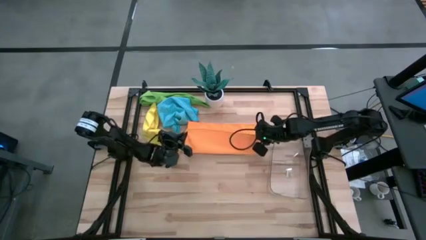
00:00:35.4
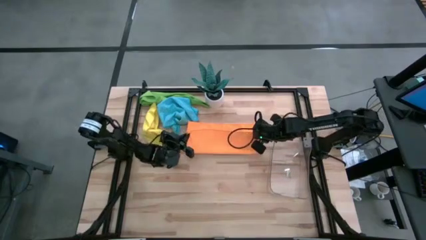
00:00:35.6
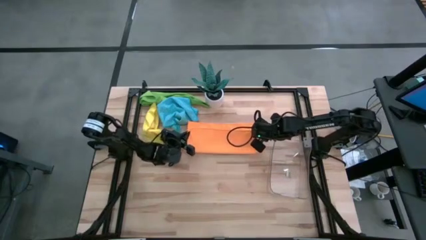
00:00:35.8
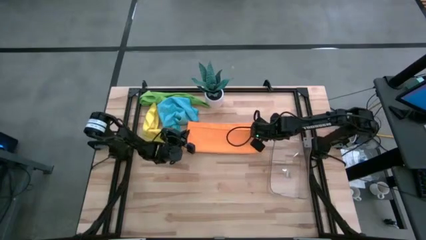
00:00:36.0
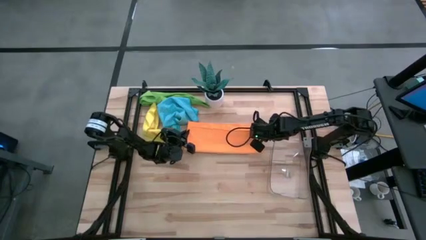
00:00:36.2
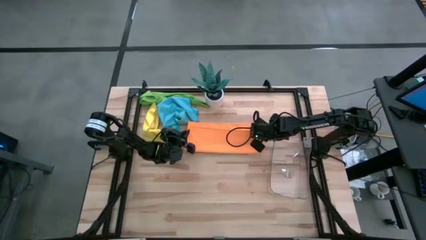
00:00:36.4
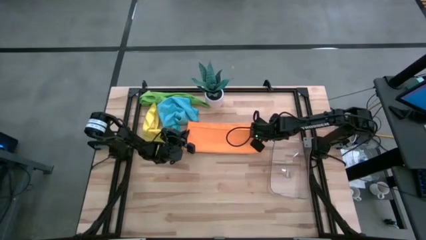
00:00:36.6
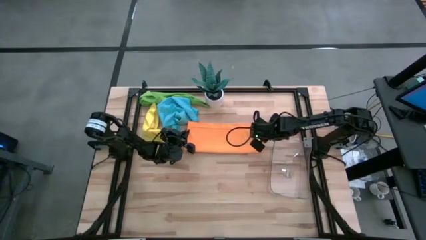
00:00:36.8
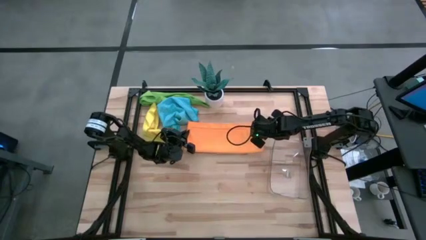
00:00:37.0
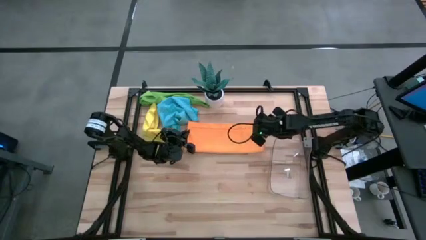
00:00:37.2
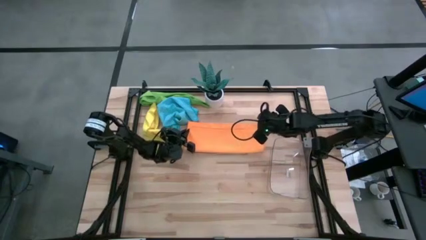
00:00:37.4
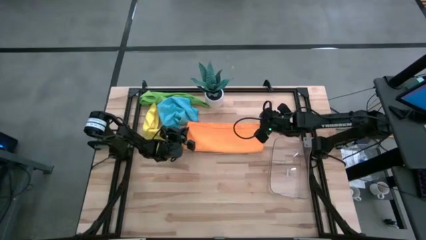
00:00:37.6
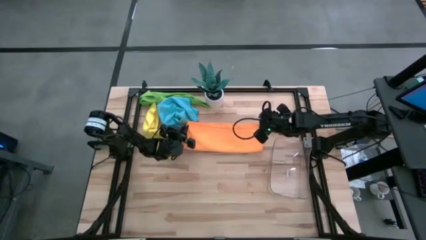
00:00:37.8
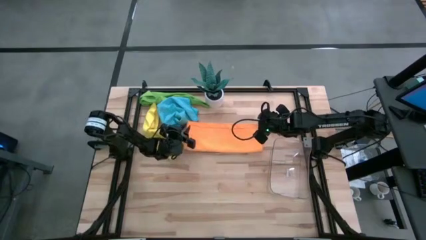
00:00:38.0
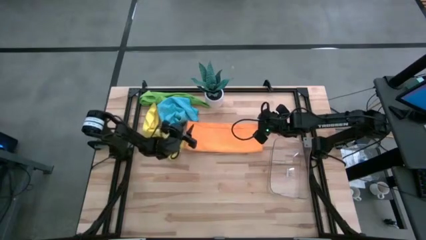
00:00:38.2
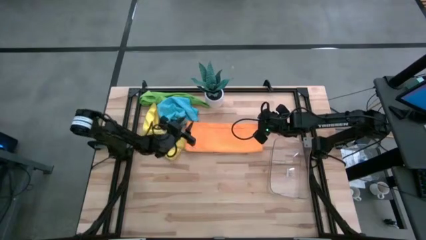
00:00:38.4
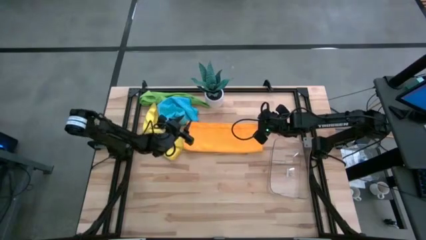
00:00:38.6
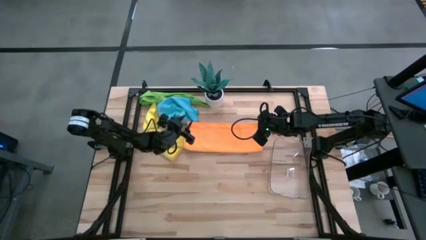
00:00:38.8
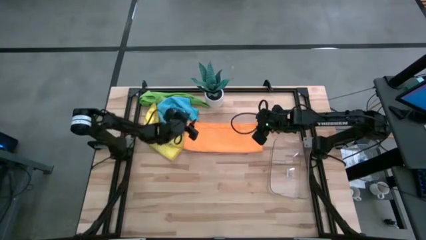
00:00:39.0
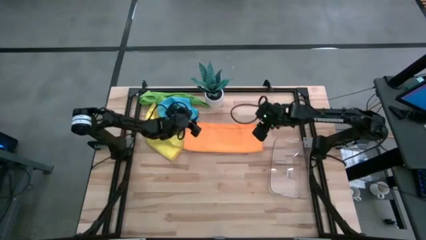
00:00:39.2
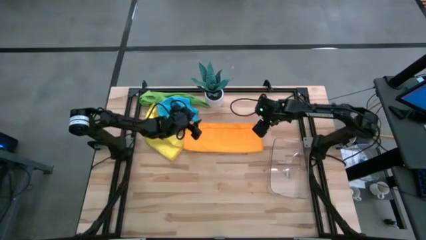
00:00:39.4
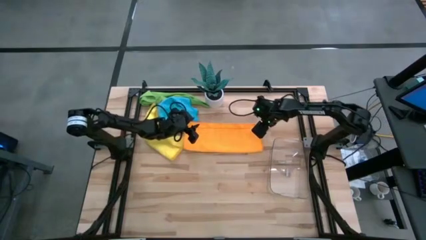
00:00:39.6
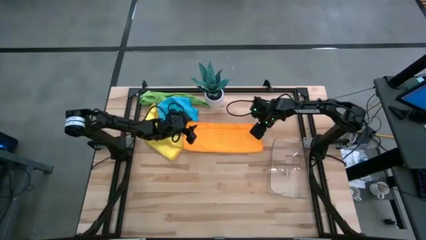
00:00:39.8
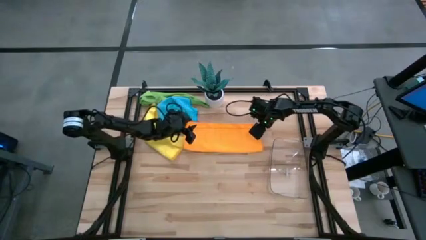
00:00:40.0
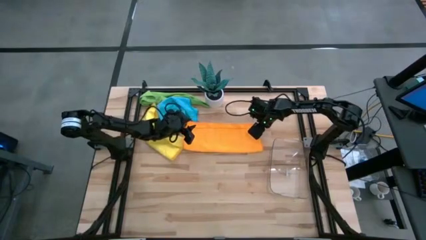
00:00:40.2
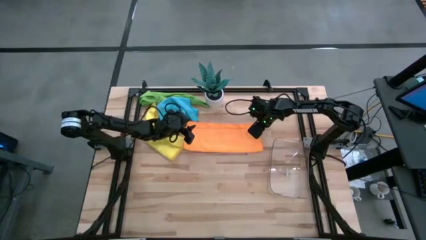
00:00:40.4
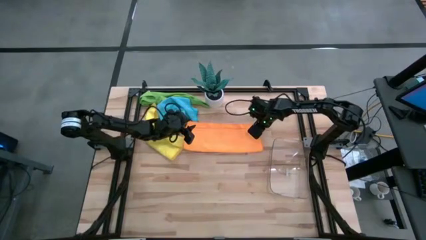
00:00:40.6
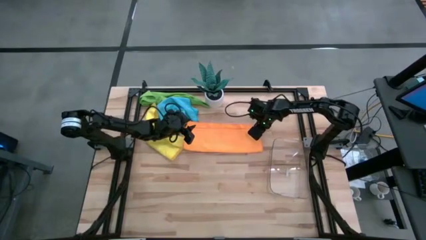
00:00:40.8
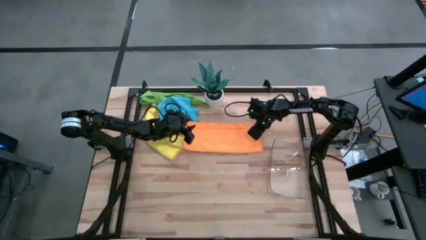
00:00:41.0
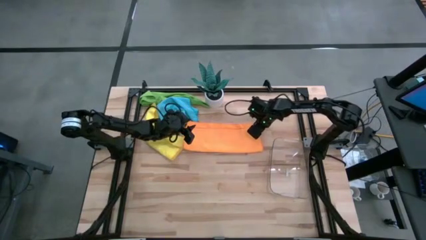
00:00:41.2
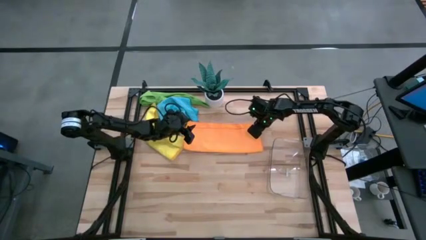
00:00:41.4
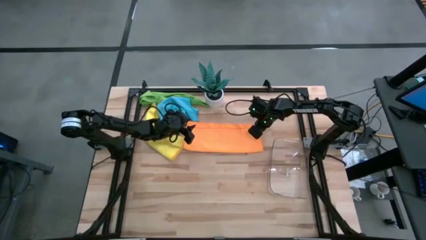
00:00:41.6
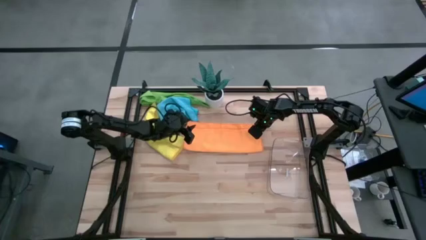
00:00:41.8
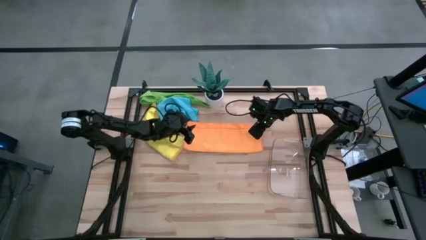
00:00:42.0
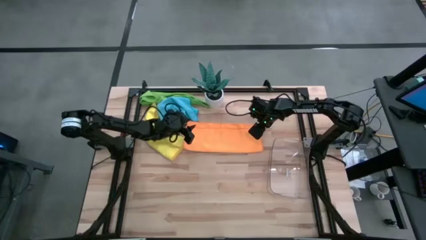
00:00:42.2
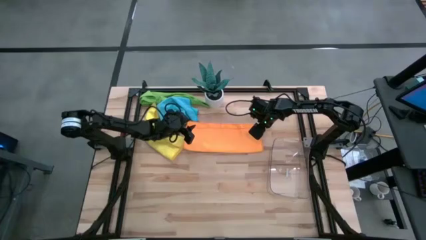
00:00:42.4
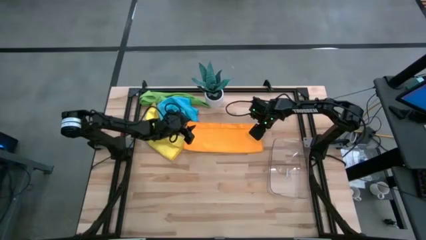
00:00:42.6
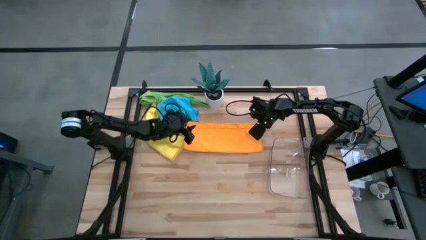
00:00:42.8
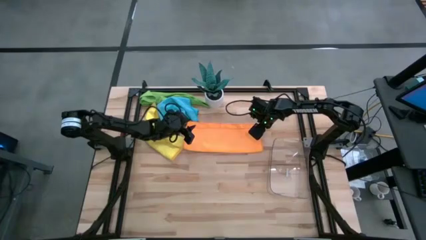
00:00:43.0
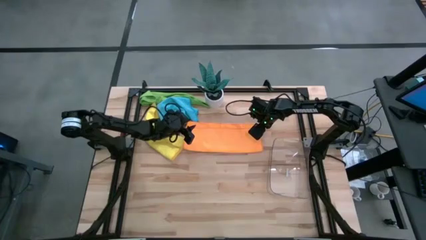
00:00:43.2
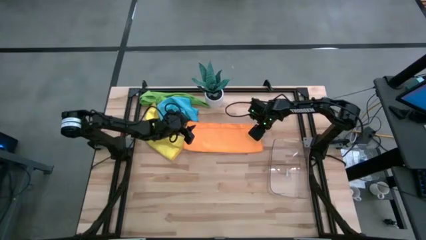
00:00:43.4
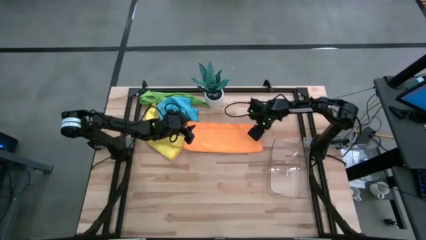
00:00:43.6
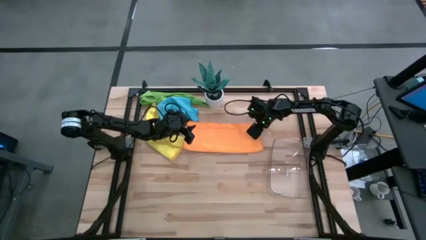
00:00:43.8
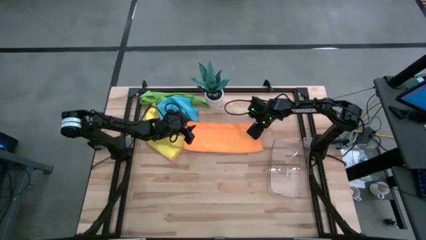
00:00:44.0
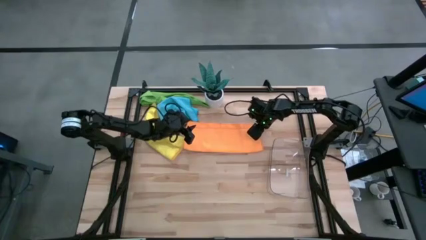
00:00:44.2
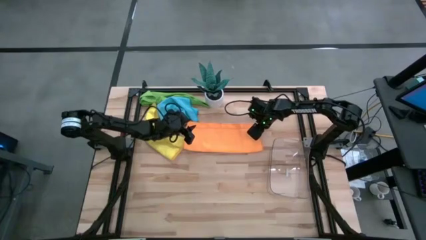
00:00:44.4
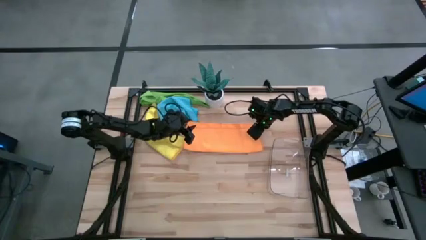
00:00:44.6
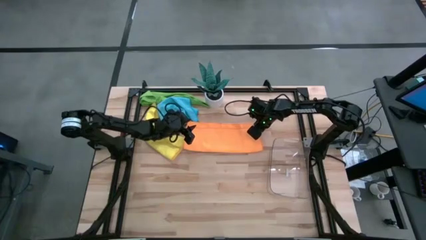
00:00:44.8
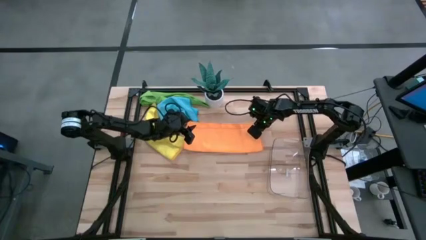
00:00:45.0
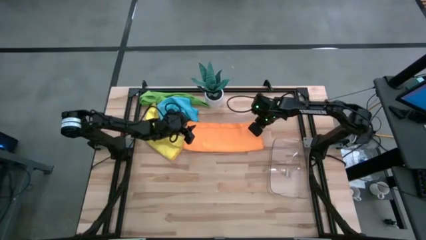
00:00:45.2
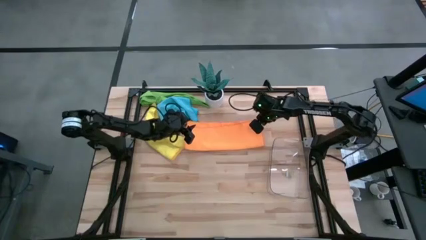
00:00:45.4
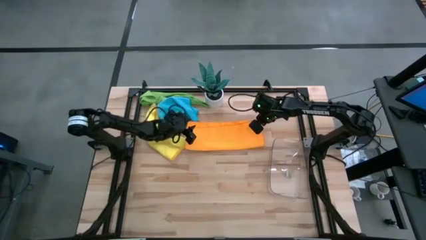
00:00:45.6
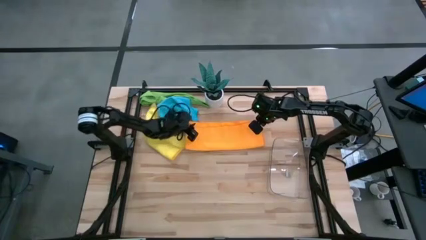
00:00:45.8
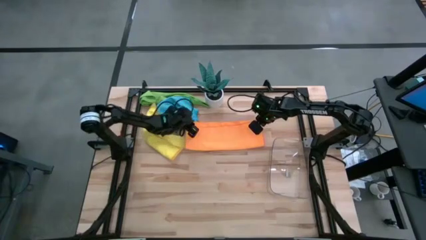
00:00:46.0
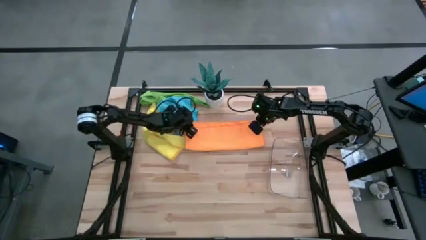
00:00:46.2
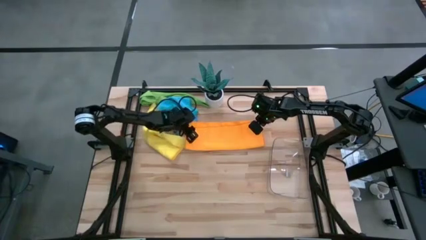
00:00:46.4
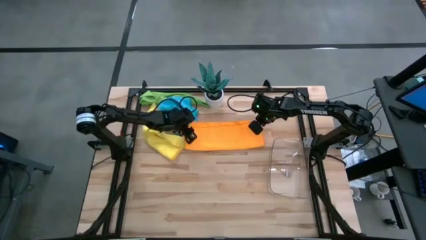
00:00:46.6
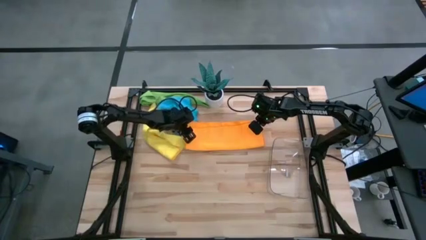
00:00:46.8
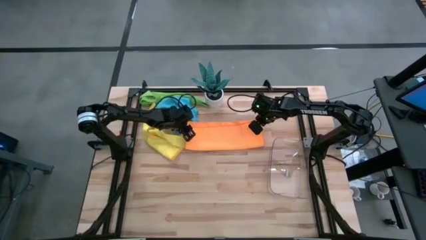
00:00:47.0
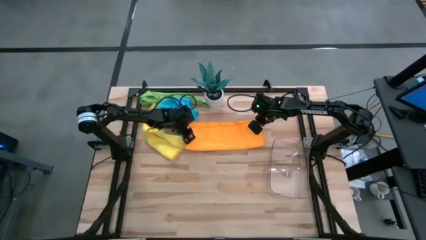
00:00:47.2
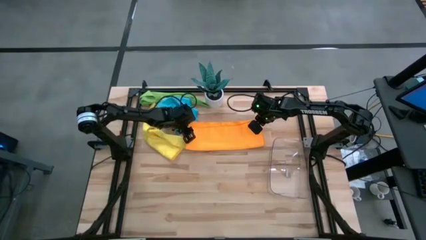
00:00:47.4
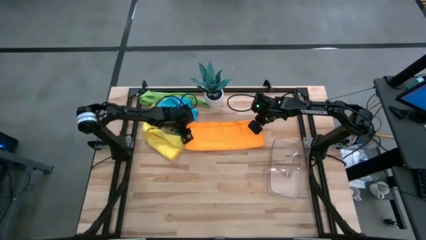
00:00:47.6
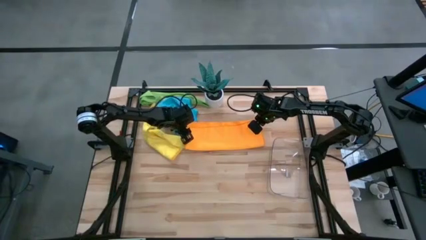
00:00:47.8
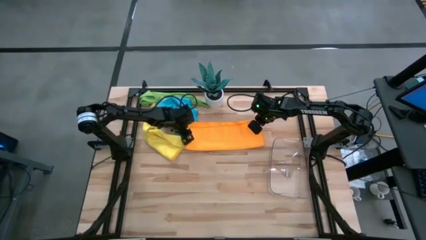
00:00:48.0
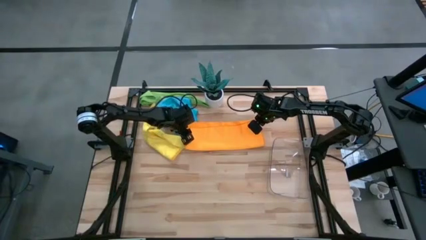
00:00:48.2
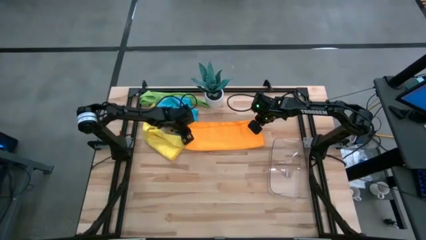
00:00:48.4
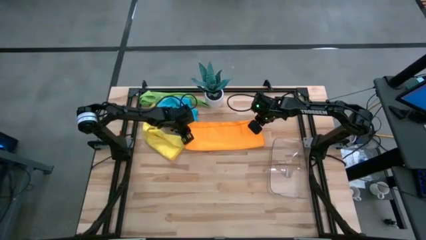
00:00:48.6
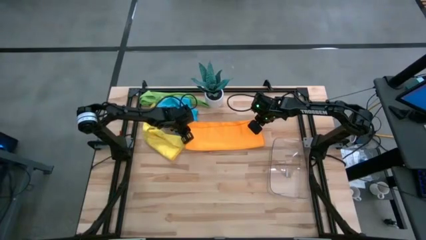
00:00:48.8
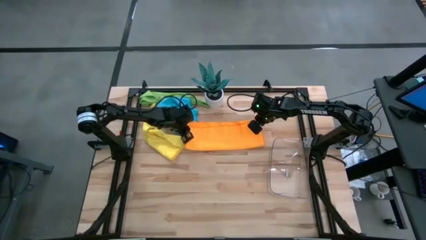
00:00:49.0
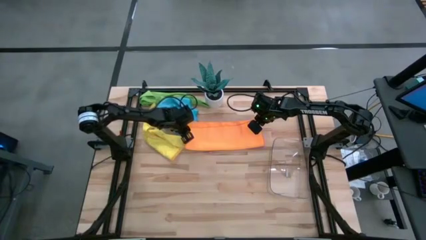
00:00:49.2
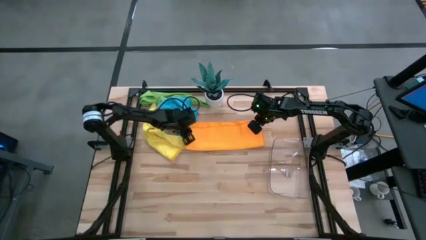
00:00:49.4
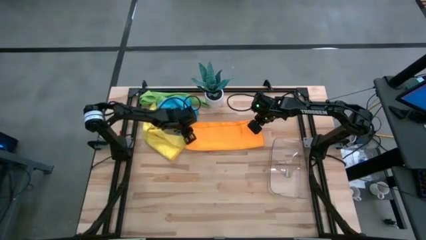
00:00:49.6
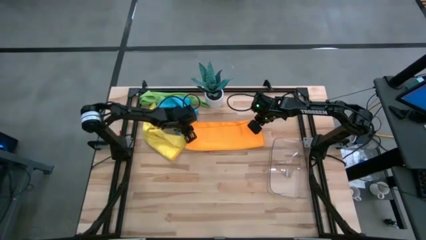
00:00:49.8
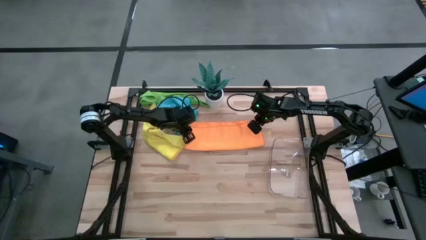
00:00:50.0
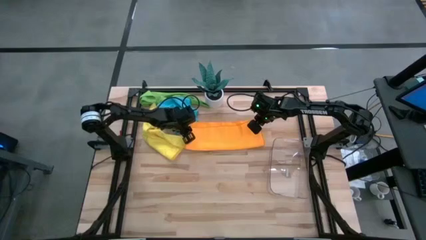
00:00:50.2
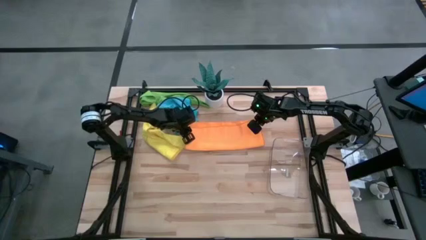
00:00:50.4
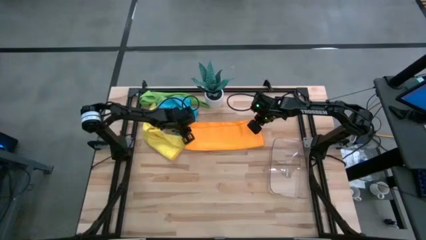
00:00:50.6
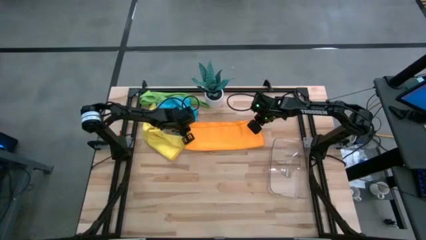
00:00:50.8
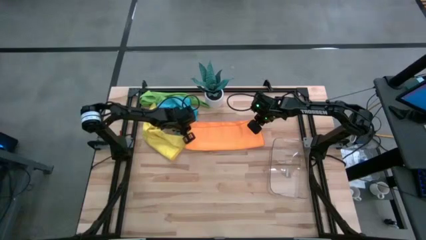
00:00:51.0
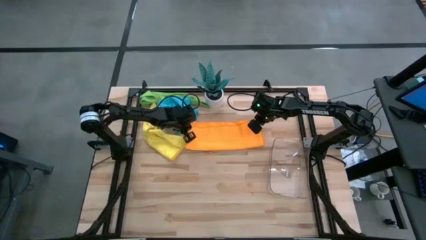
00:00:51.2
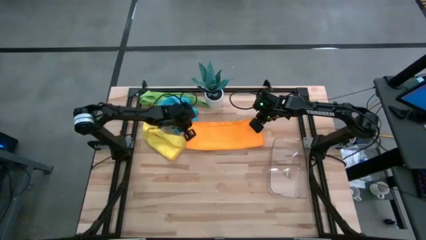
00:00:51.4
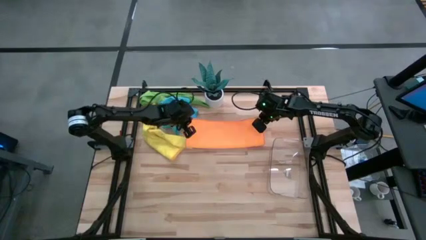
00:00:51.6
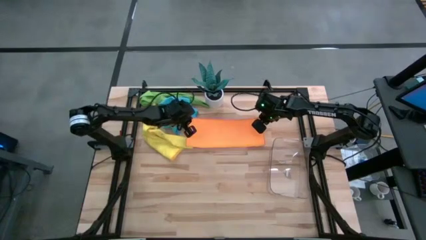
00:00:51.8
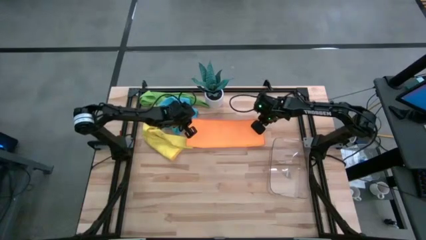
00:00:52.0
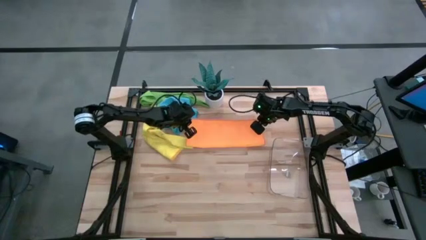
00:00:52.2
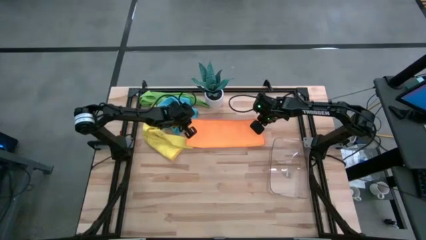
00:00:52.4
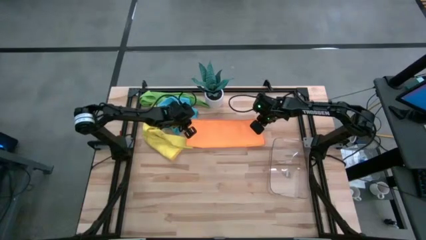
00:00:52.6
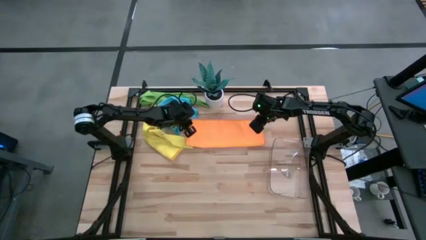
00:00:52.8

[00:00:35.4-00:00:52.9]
Task: Roll microfiber towels into tight, uniform cylinder then place into a basket
Fold the orange microfiber cloth
